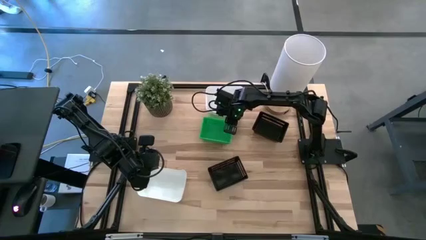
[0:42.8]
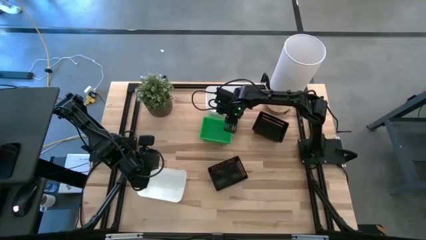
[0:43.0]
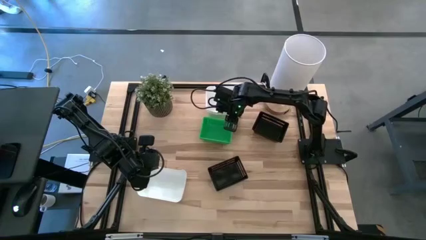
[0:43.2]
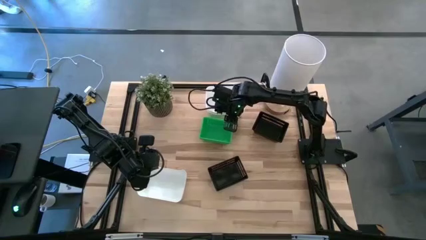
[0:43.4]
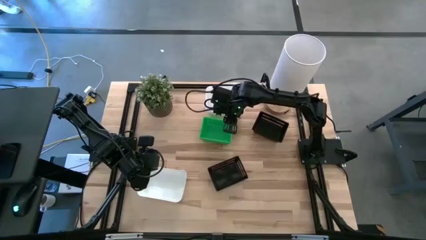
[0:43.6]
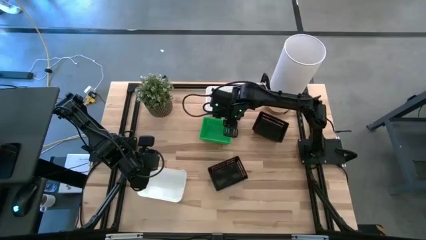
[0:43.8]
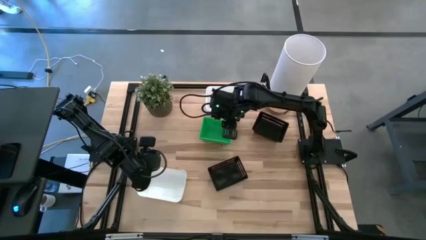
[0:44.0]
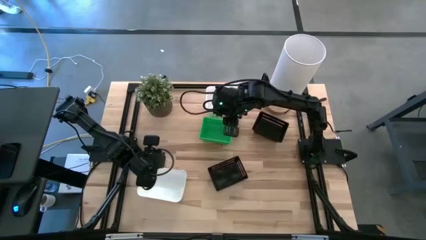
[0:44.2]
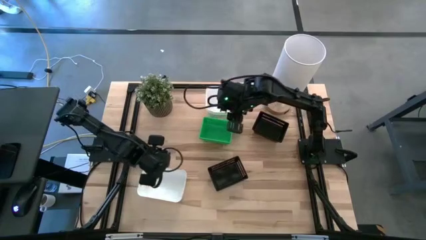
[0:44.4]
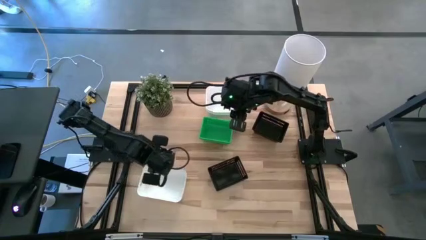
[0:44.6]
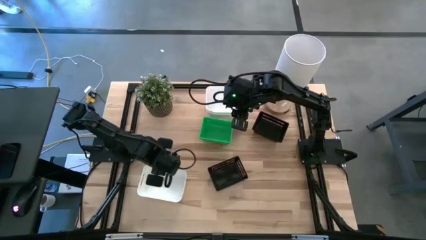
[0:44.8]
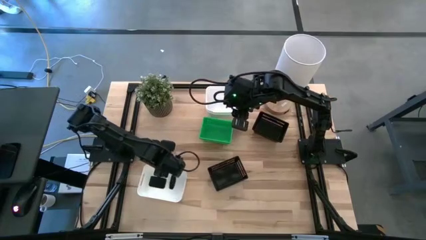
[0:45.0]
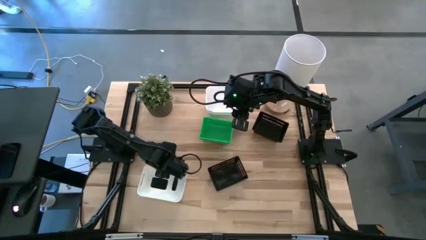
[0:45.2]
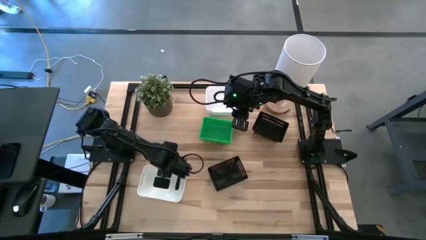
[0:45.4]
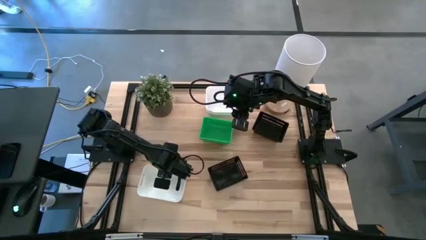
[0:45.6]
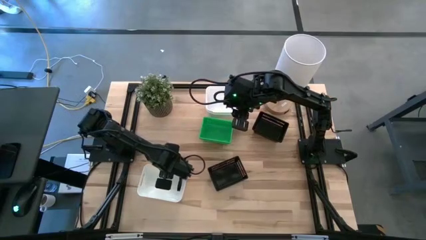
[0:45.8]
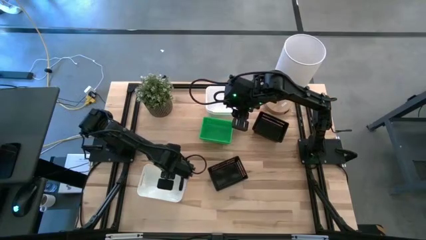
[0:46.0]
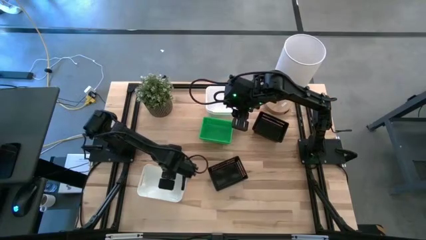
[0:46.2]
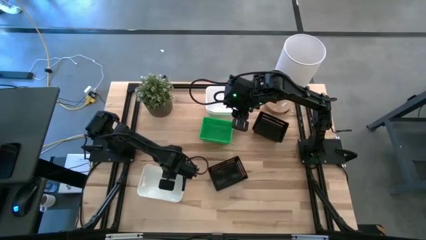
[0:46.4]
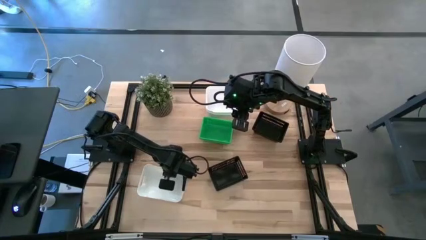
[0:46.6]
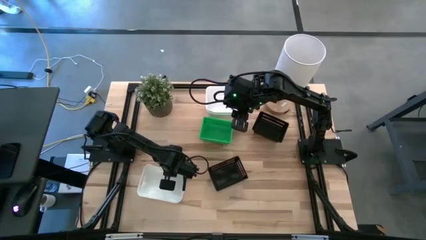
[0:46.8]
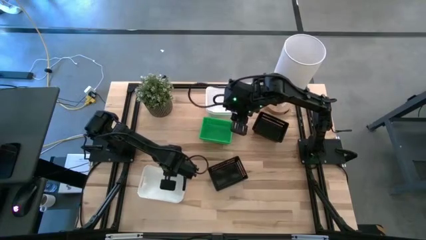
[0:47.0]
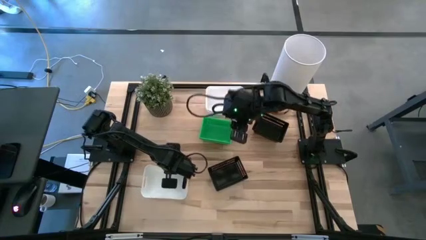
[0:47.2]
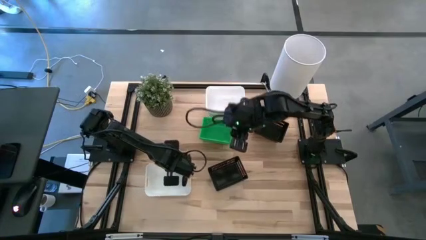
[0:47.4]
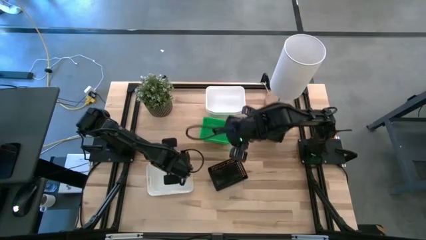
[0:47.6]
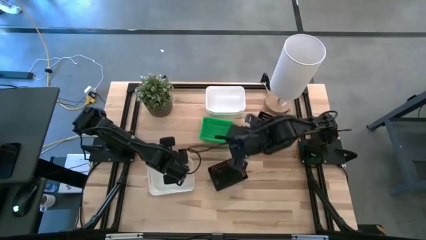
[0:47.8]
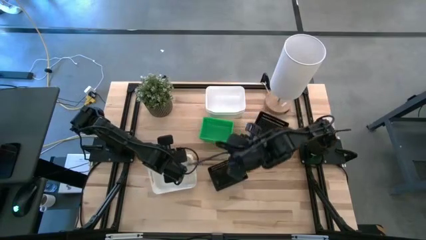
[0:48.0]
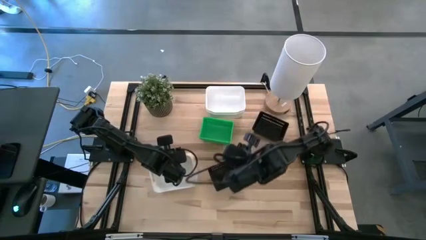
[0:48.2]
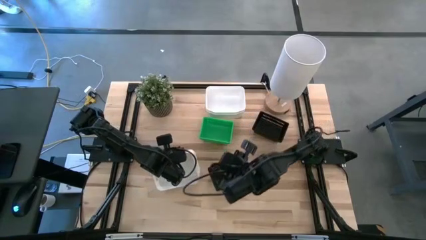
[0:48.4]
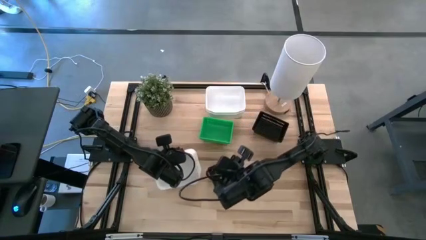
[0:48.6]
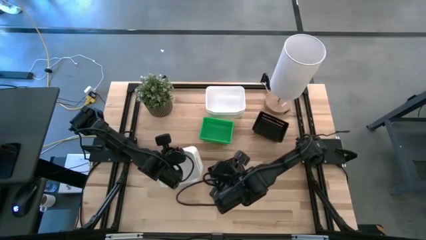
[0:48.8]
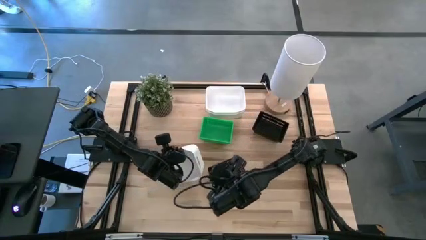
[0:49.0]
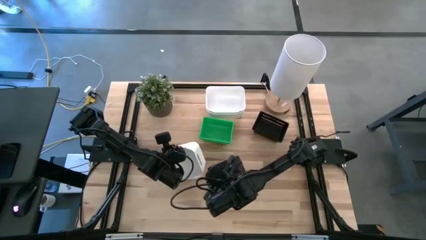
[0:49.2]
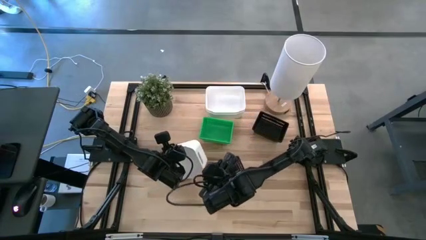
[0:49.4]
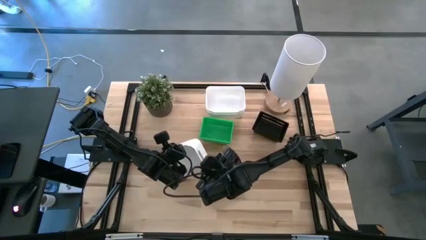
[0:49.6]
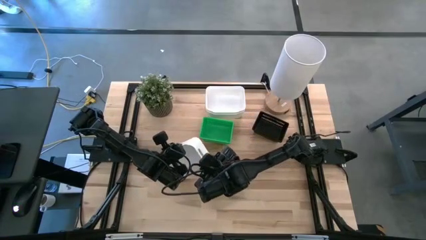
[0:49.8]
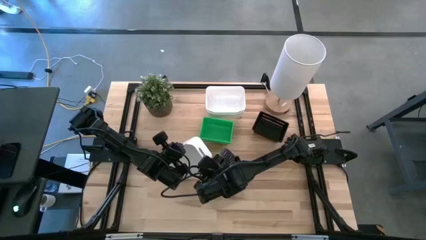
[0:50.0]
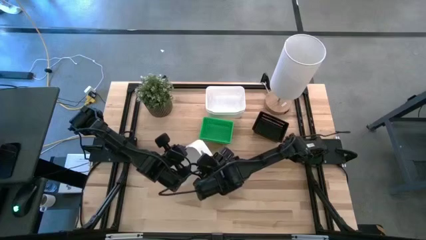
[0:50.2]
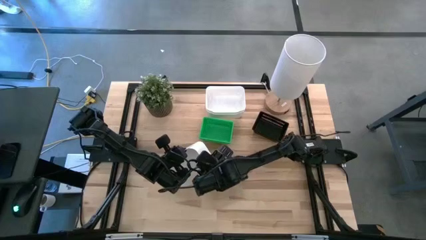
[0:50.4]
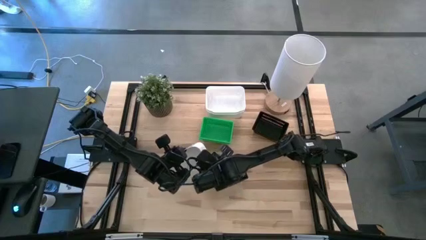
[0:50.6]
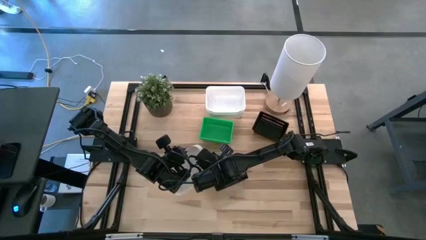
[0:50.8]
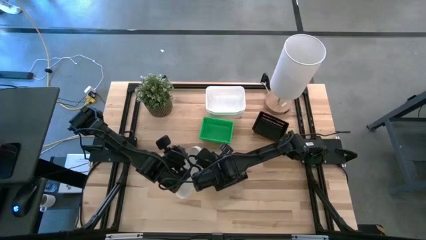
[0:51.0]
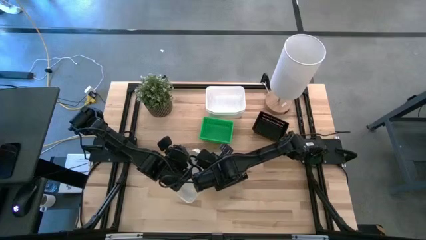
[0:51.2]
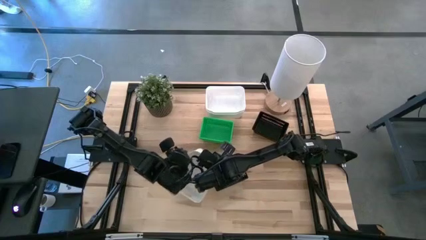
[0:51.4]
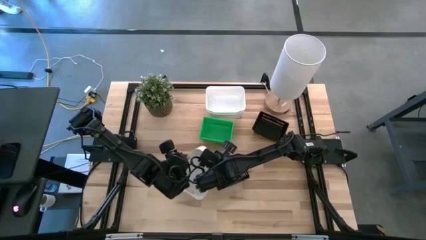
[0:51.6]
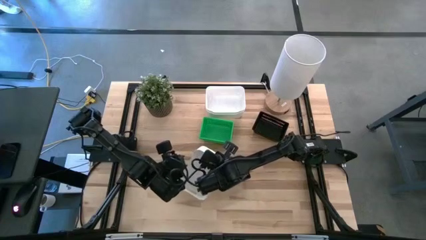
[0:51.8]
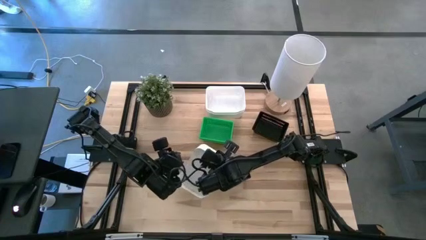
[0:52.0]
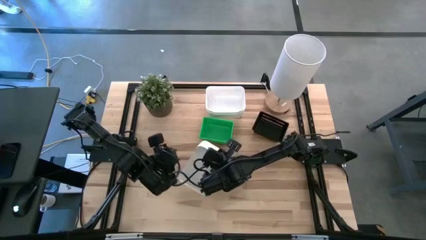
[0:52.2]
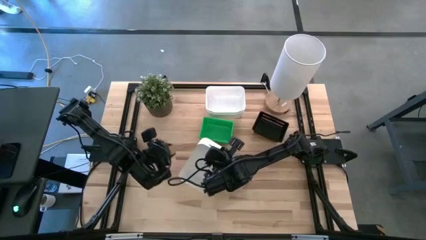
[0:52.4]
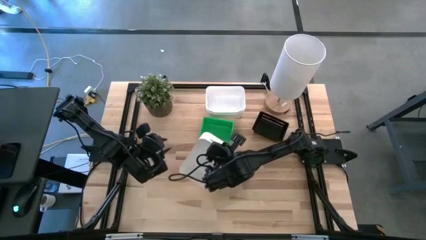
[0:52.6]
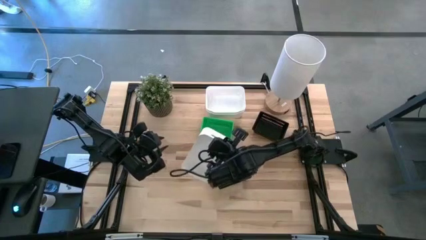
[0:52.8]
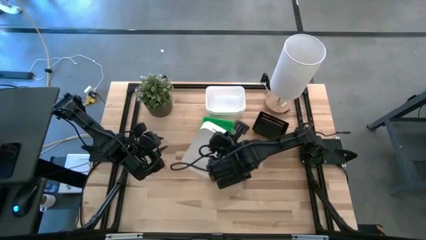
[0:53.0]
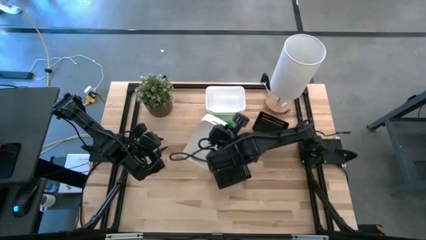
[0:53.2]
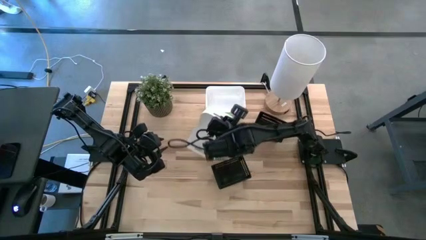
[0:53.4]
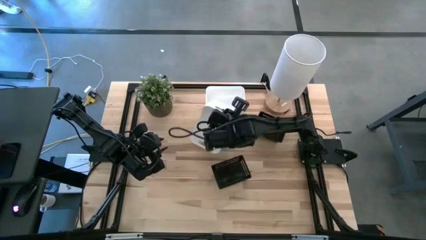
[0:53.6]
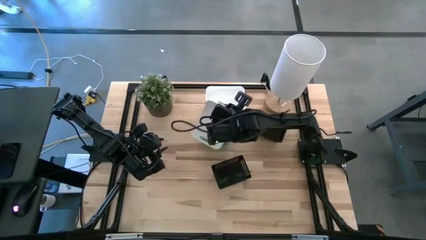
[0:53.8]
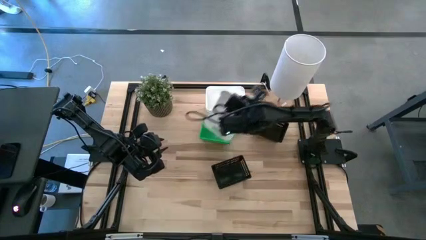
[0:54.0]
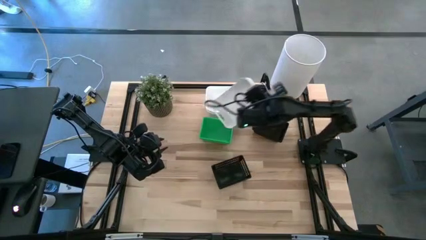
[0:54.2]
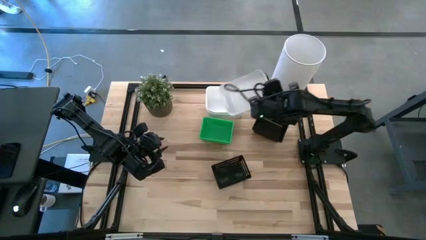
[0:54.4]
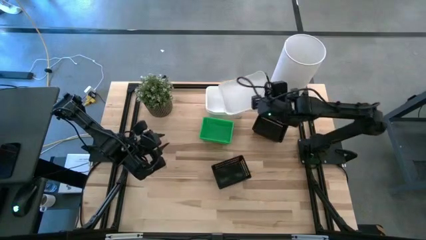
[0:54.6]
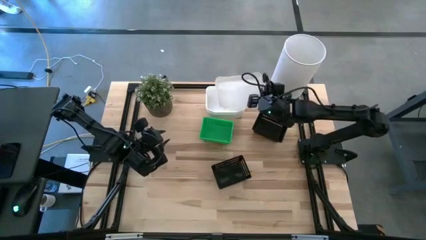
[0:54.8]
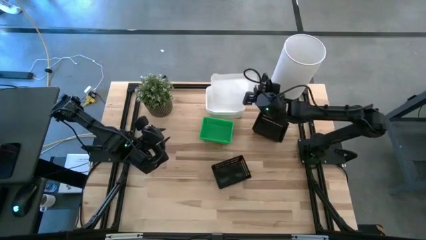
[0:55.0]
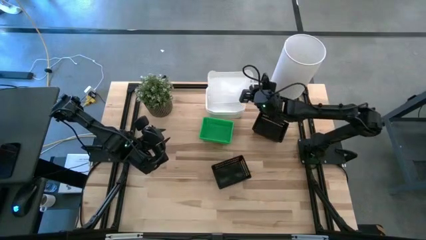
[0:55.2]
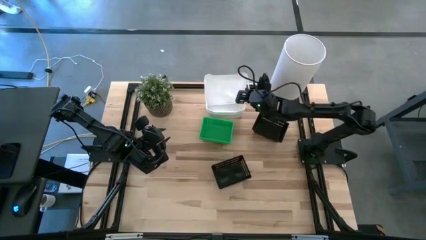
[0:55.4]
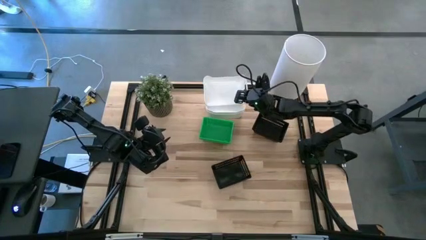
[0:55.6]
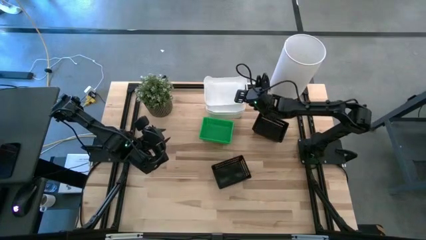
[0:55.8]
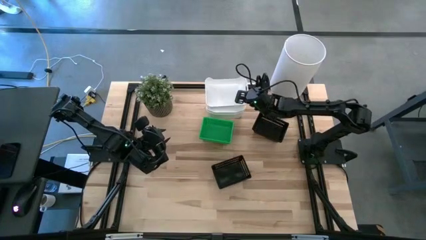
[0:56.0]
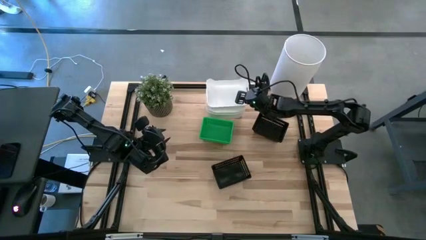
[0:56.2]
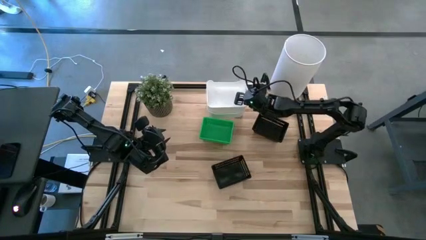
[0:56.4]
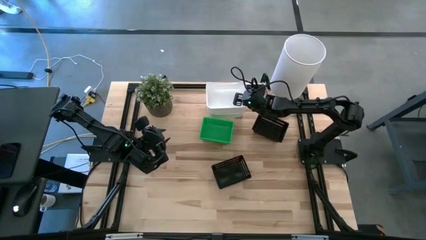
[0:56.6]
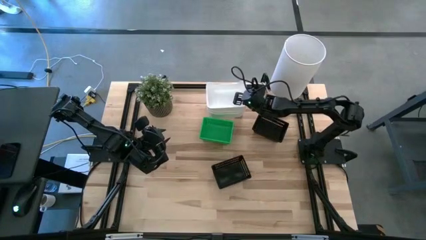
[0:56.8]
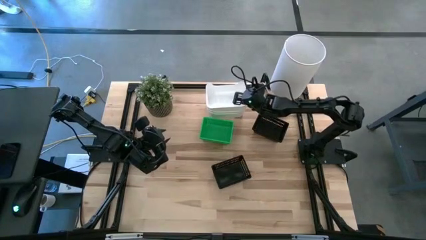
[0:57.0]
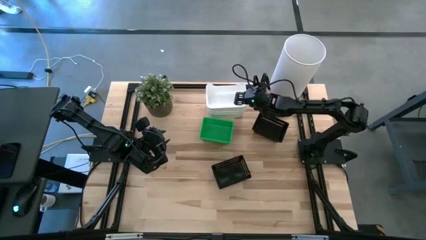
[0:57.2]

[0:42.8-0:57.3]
Stack the bottom white bin on top of the top white bins
